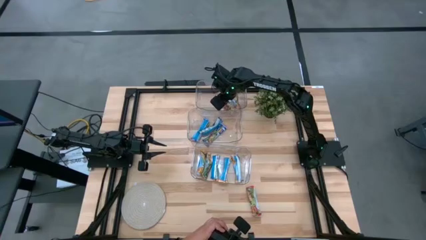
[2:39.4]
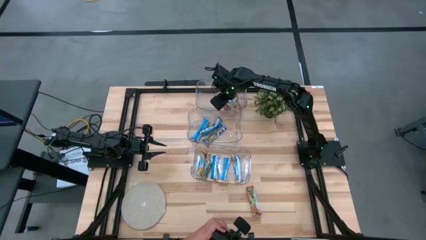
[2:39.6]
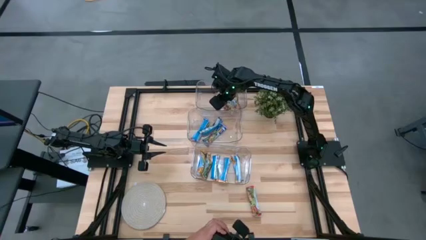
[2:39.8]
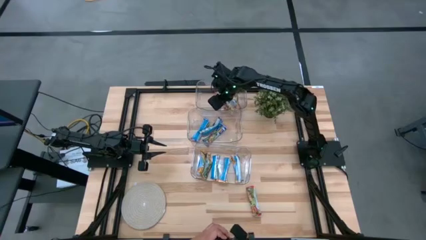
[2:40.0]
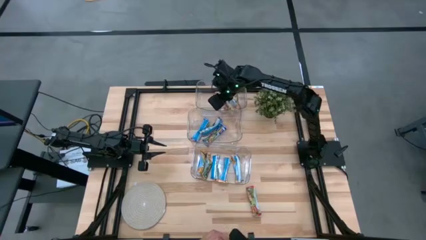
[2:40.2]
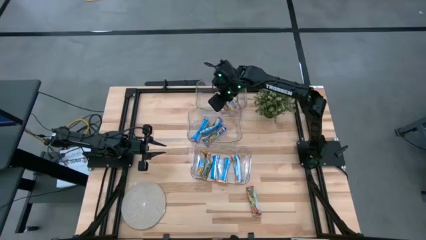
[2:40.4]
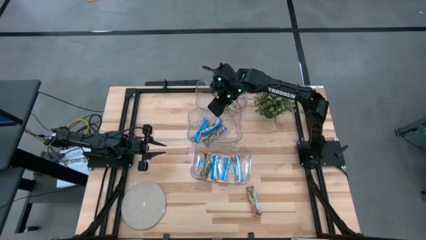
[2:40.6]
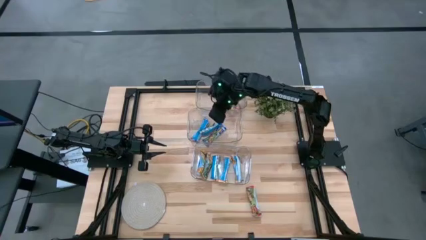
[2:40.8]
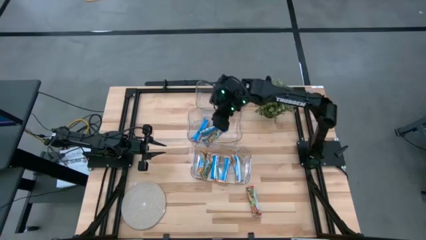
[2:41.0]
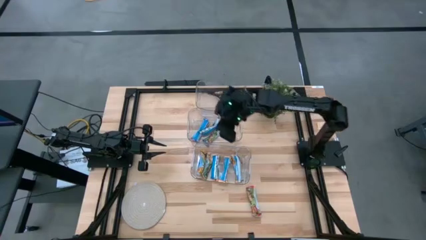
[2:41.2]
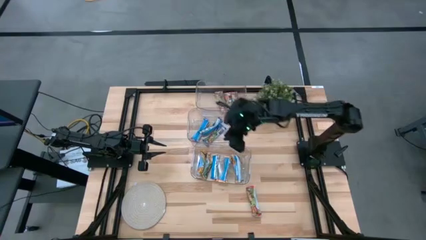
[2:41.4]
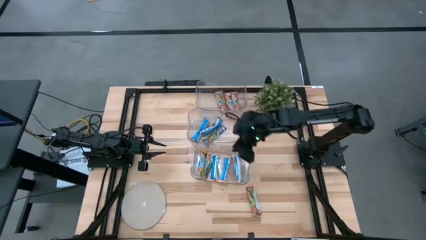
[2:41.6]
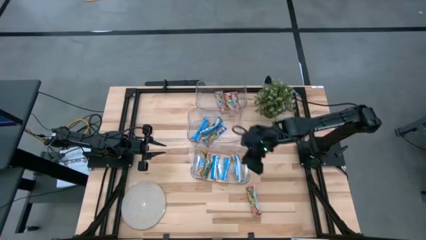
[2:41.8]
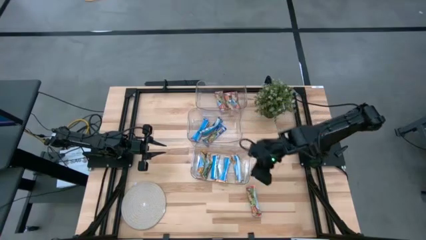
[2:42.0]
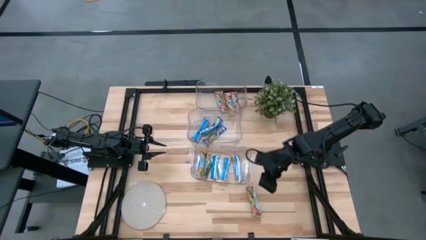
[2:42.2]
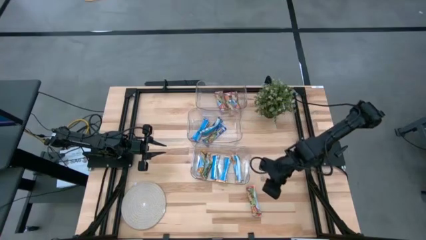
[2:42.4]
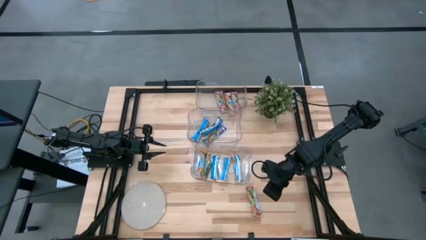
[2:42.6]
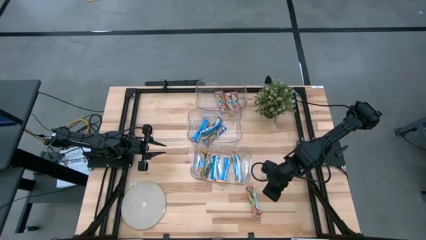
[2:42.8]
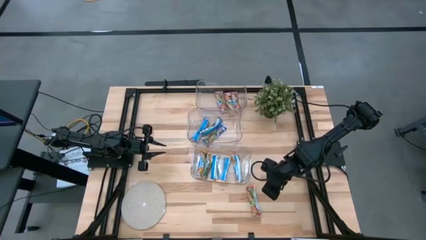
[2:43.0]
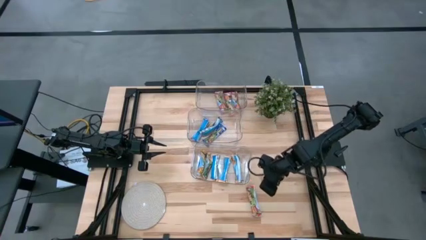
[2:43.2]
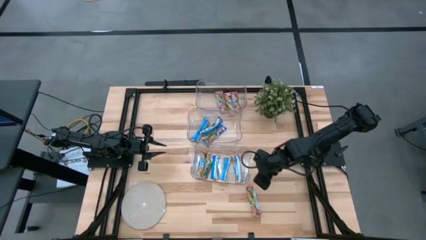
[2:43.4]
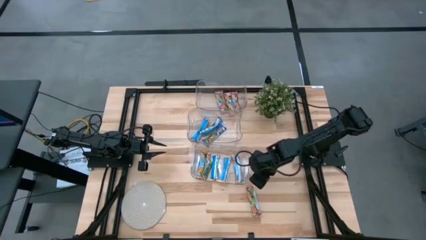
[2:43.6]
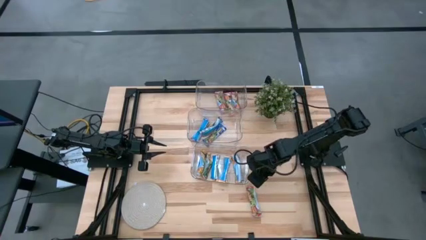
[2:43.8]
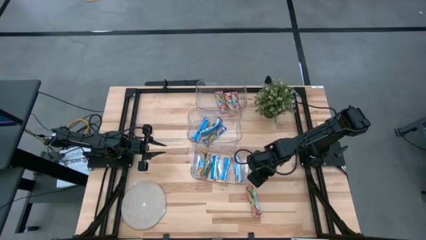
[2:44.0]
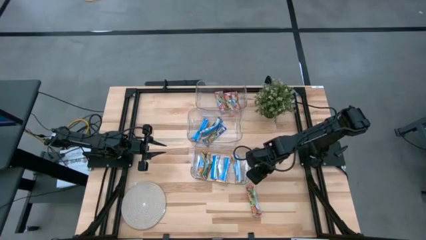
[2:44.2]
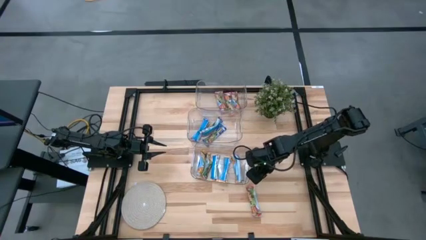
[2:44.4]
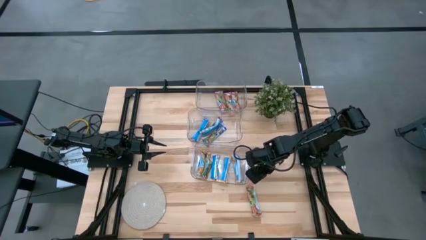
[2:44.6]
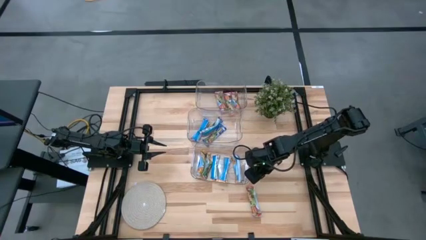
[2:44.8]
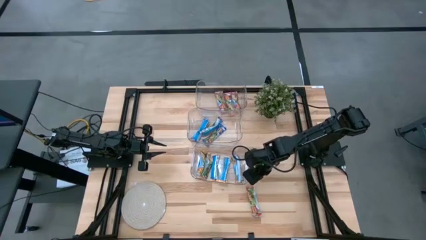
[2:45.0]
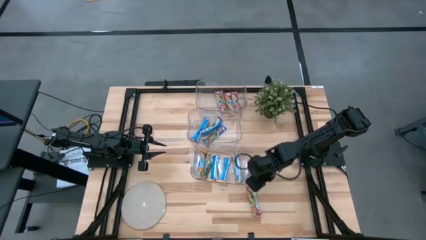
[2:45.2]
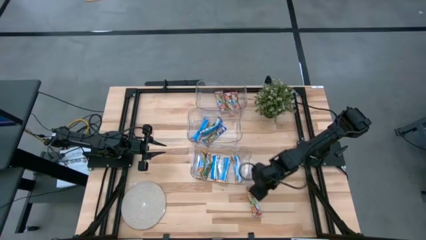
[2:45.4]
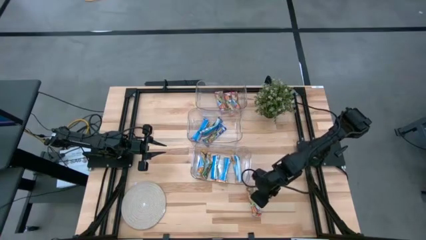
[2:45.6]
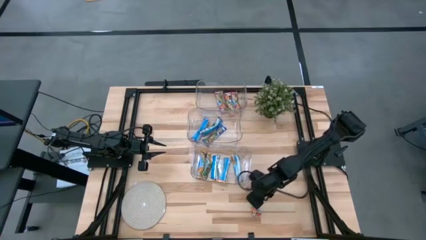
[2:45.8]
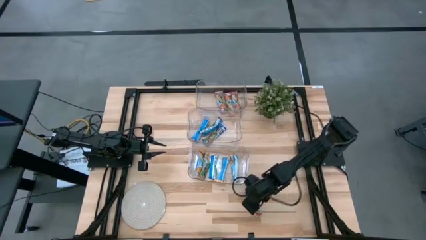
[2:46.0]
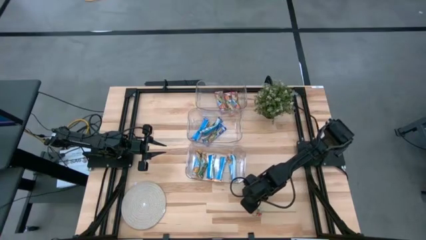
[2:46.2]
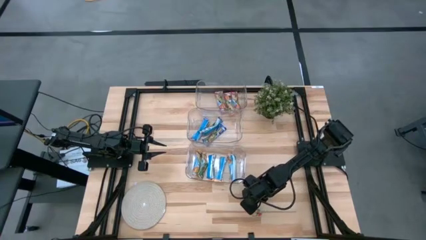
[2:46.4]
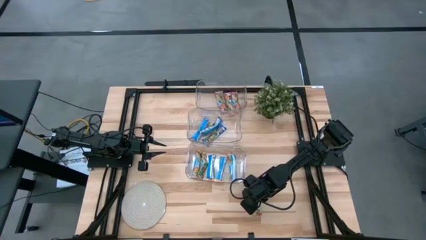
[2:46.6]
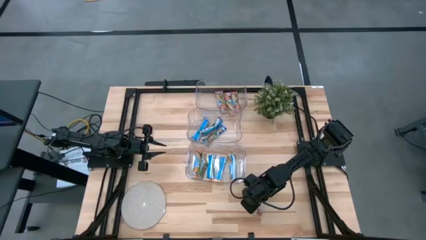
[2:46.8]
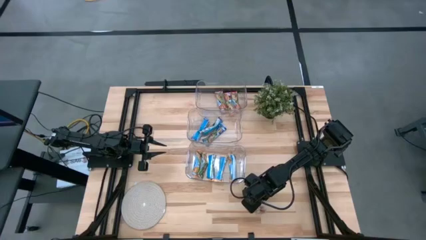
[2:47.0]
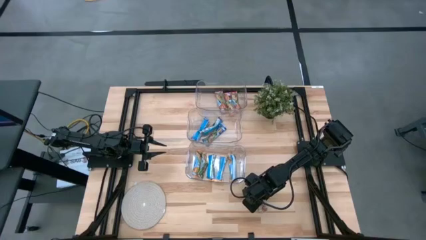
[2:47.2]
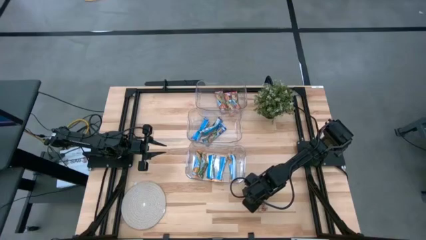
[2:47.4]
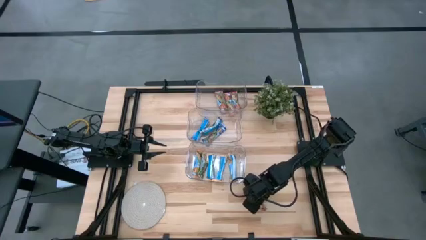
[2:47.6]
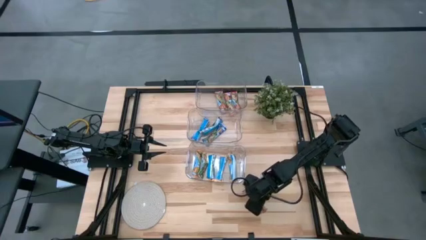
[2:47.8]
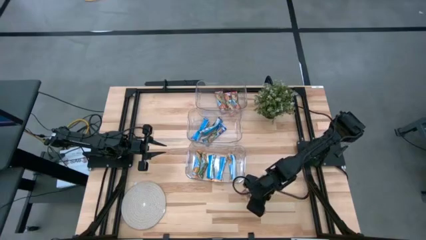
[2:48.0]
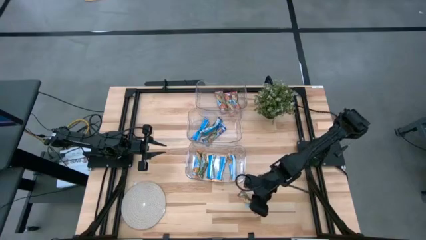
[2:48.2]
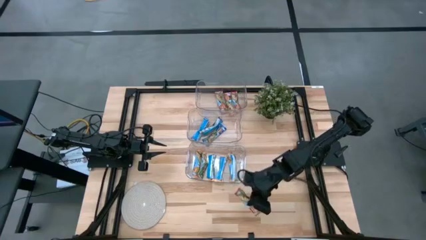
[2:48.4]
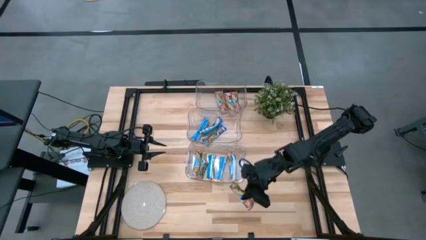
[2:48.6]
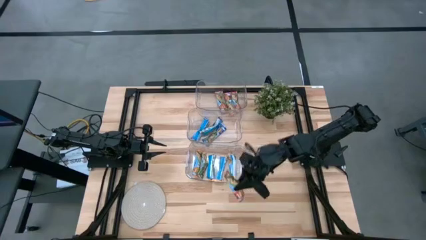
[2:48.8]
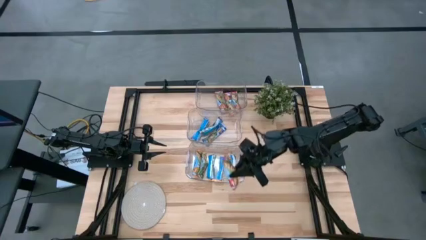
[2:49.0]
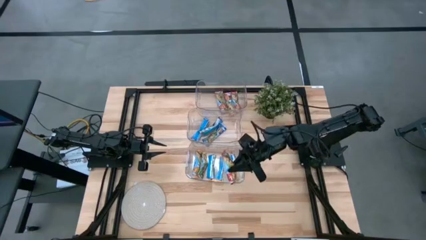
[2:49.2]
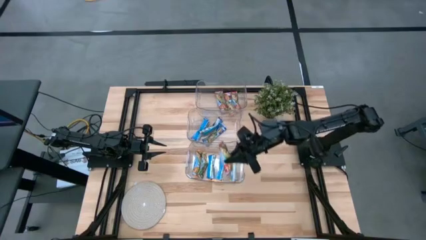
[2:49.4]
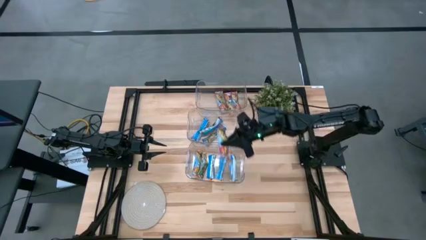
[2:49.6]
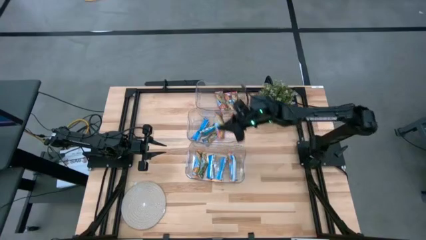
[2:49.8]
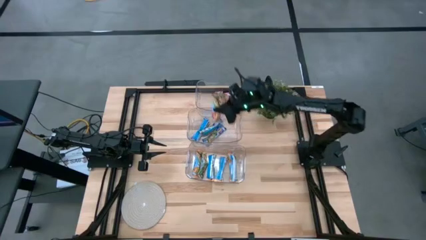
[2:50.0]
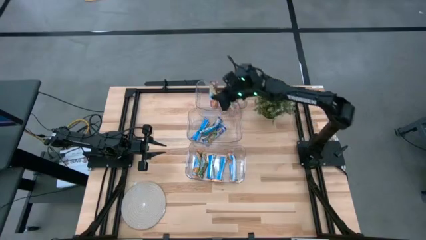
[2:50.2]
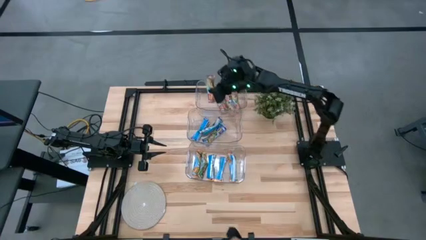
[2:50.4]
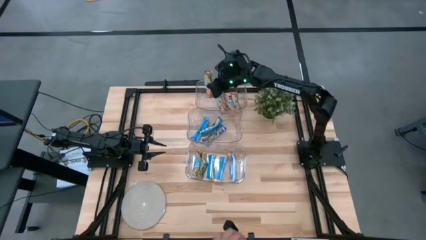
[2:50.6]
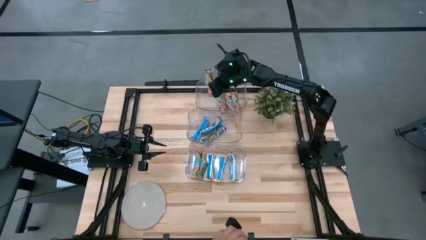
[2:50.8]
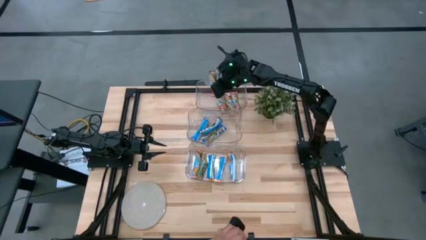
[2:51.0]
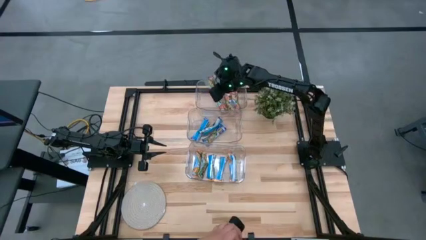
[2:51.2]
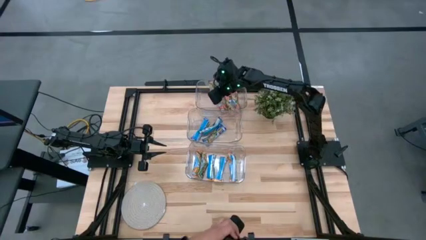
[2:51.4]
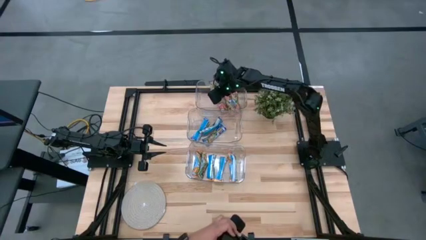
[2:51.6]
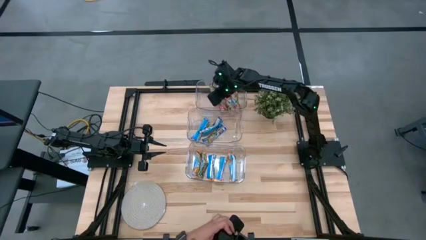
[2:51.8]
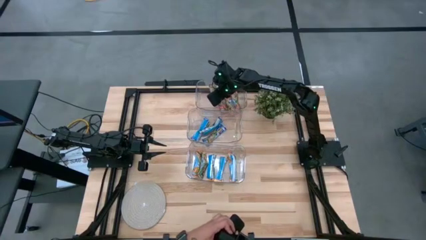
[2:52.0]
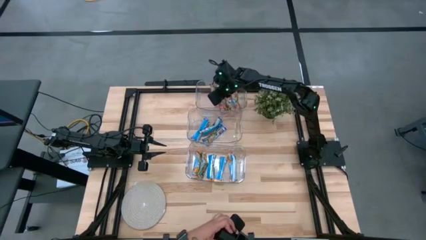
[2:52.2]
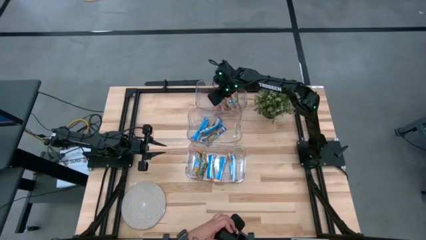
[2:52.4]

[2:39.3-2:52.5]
Task: Pick and place Granola Bars by type
Put the red granola bar into the top transparent bin

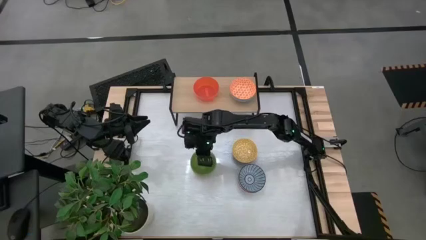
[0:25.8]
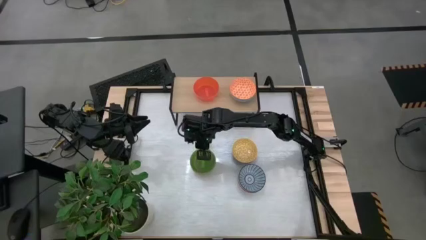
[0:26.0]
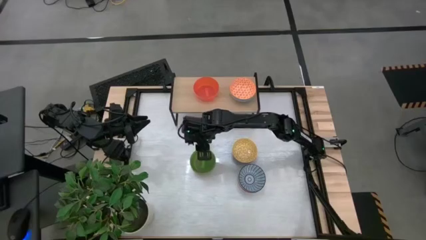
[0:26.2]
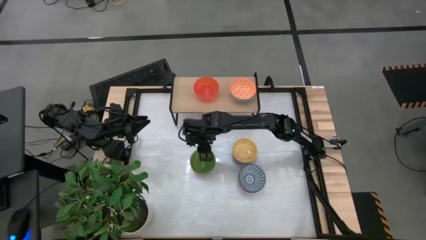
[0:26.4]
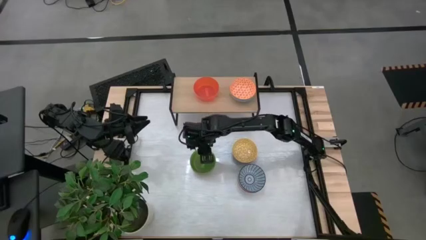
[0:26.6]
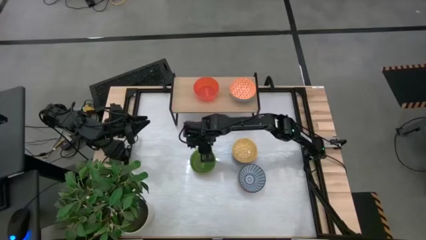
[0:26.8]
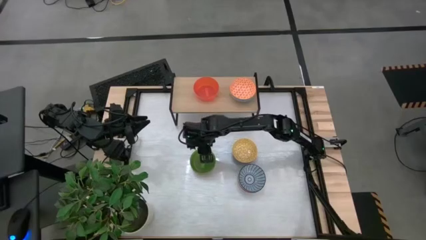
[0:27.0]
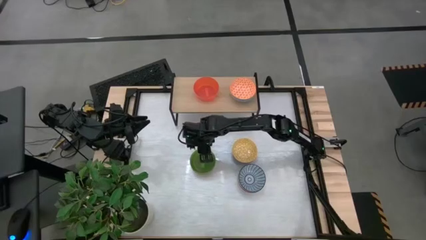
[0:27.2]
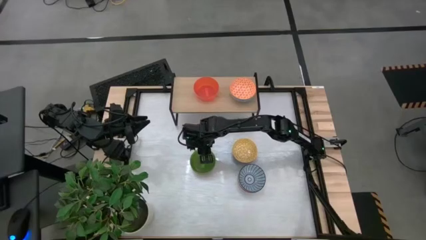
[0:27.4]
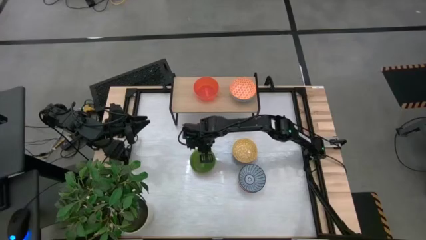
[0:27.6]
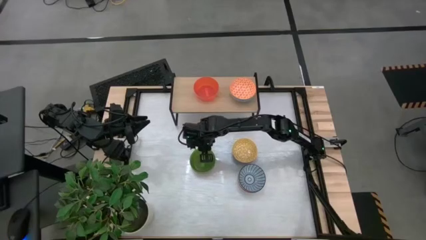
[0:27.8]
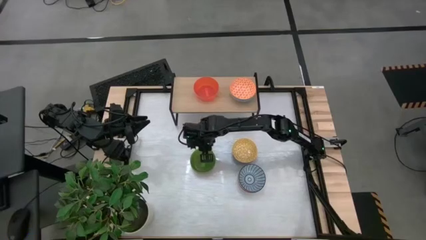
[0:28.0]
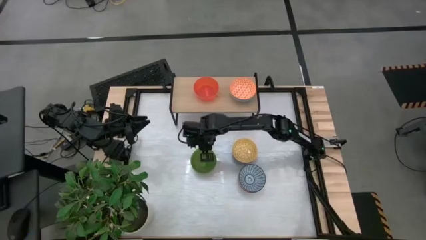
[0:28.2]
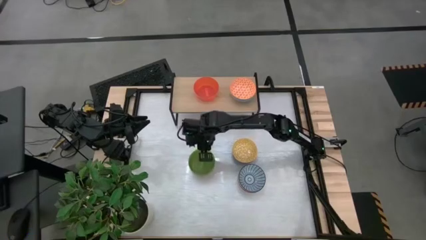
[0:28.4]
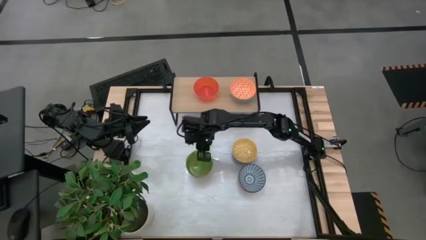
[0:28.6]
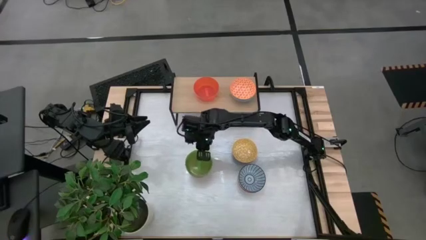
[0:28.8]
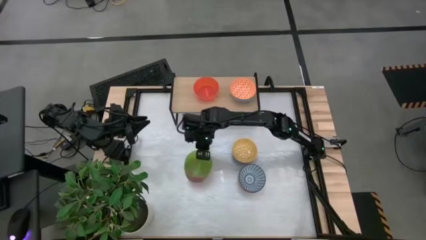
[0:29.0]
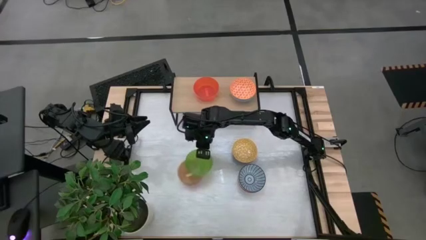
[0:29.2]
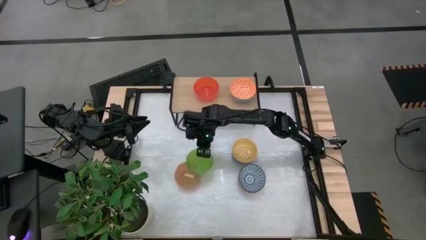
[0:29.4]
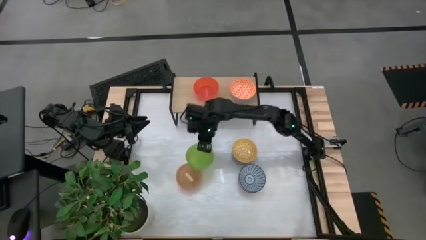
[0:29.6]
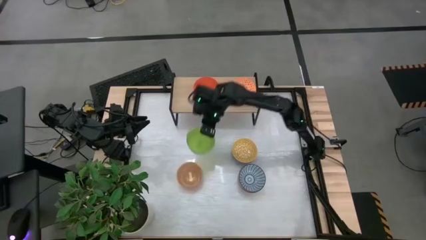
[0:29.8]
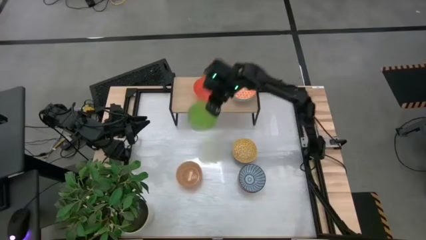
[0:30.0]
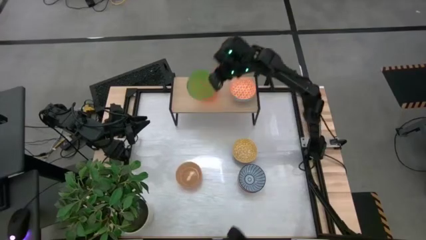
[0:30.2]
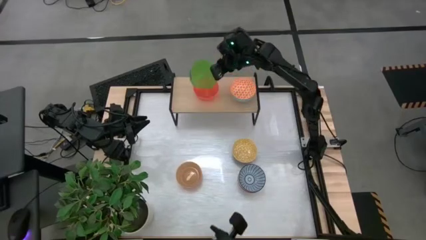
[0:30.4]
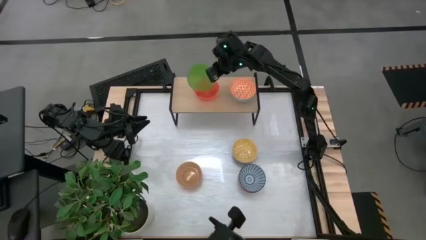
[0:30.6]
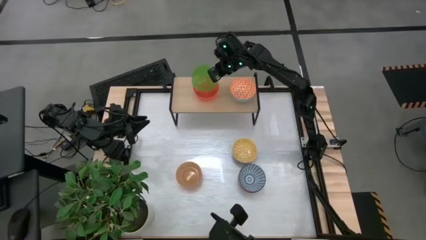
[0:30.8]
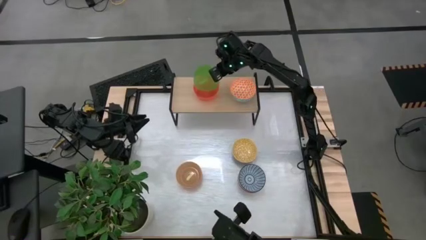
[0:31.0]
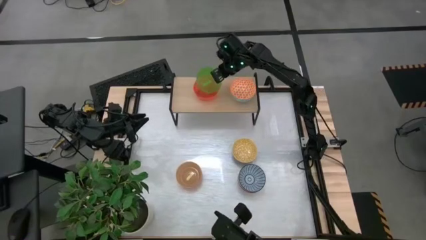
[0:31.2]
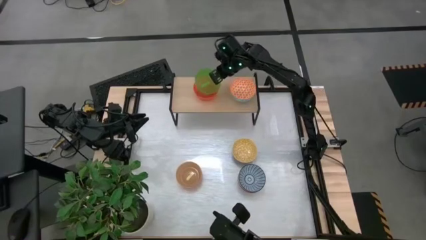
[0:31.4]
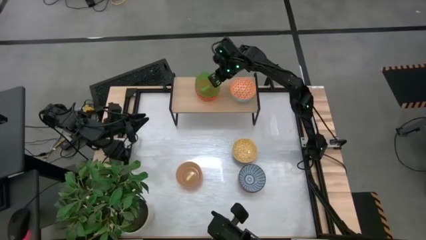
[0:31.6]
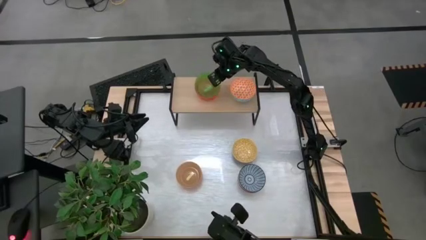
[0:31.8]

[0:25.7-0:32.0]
Task: Place and stack bowls onto a shelf
Stack the green bowl on top of the orange bowl on the shelf
